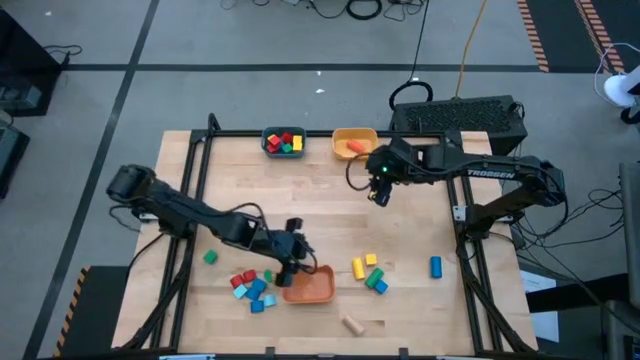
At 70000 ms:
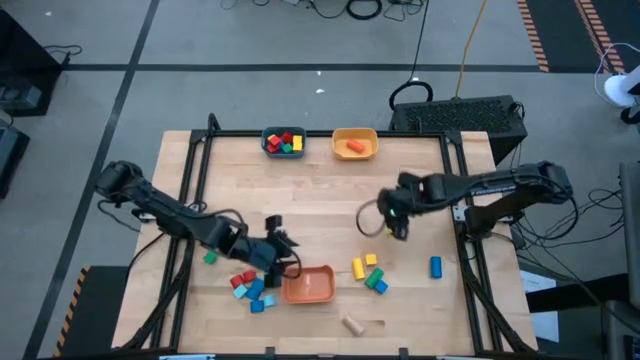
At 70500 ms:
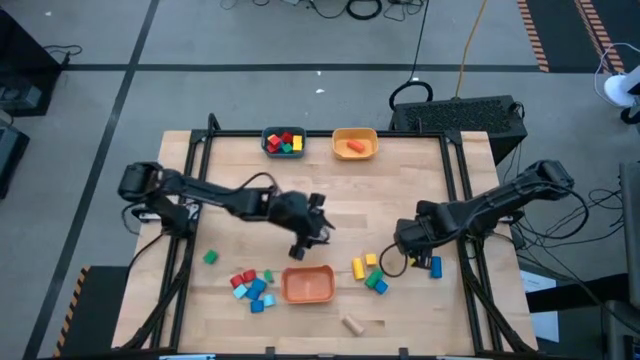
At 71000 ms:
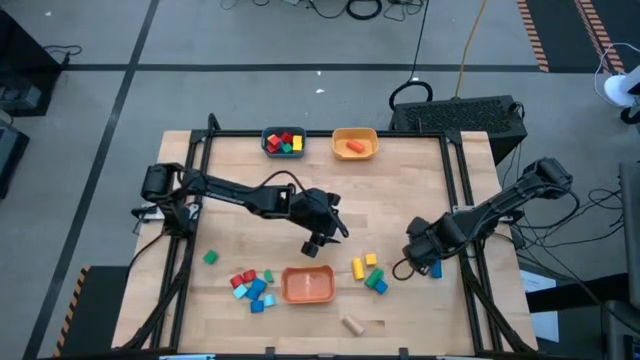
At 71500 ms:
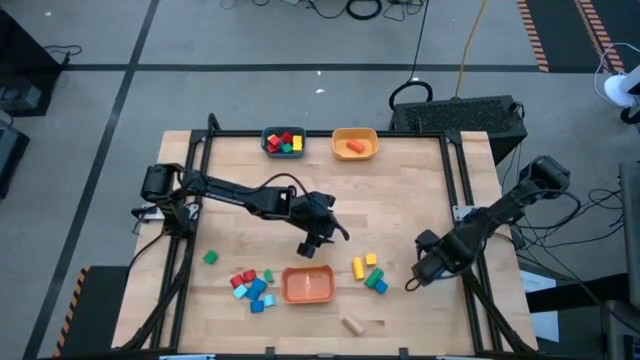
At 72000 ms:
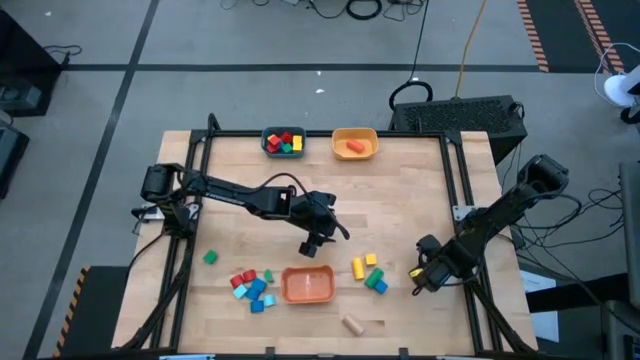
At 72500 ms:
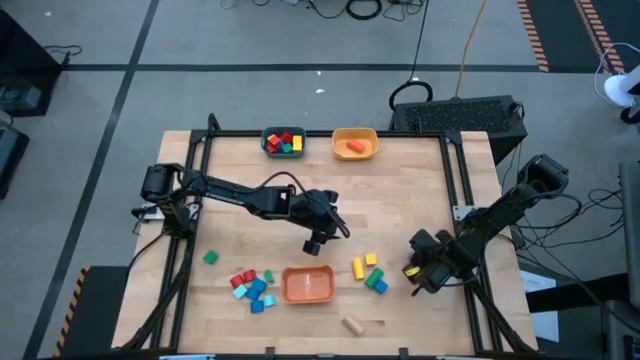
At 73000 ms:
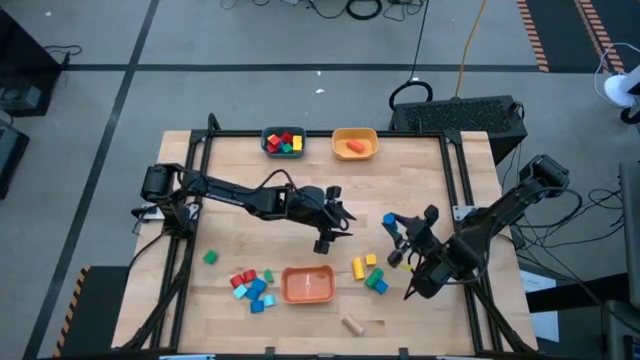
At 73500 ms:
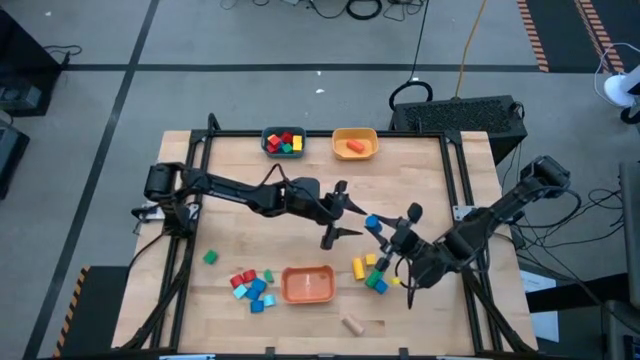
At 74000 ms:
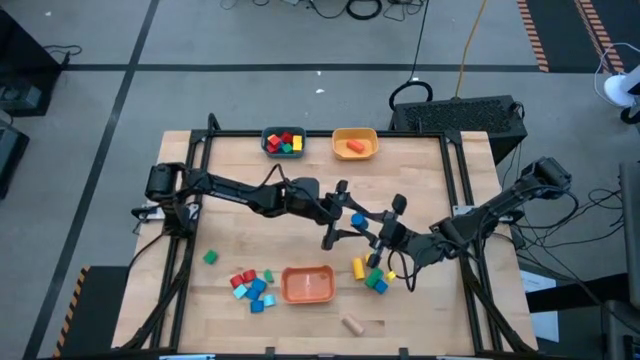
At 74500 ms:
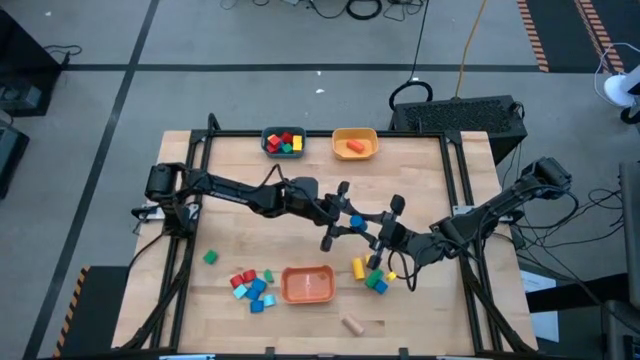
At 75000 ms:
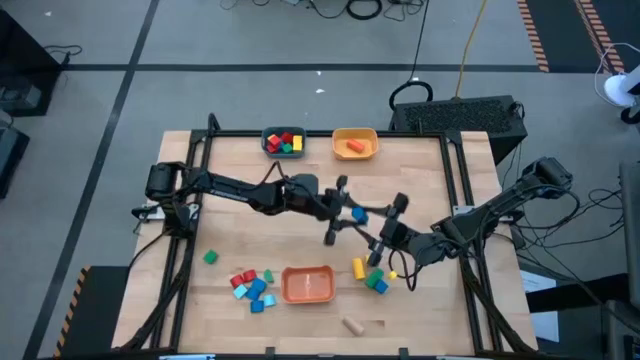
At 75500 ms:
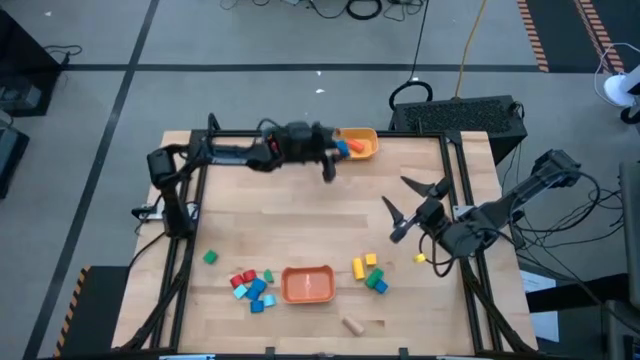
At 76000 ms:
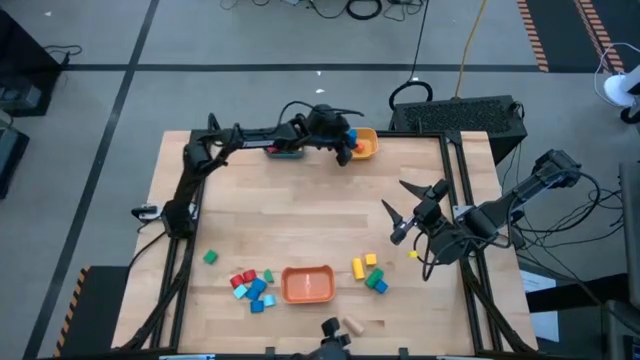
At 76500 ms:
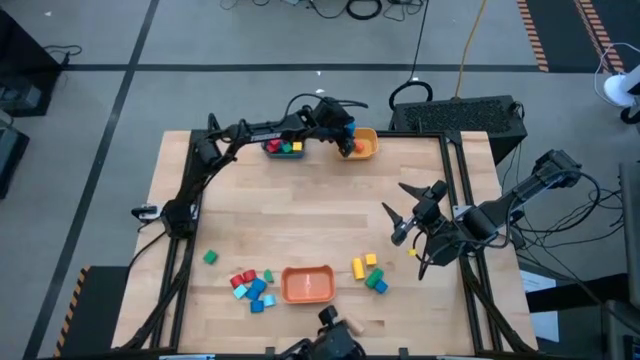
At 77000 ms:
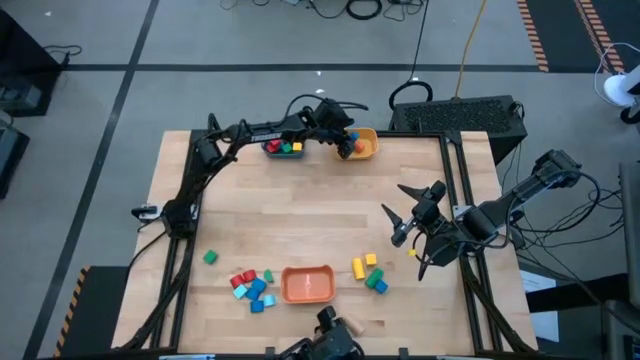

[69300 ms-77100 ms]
Task: Sort blocks by size
Put the blue cylindrical block into the yellow bin

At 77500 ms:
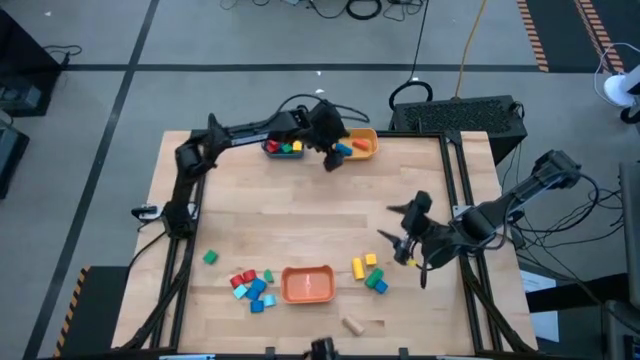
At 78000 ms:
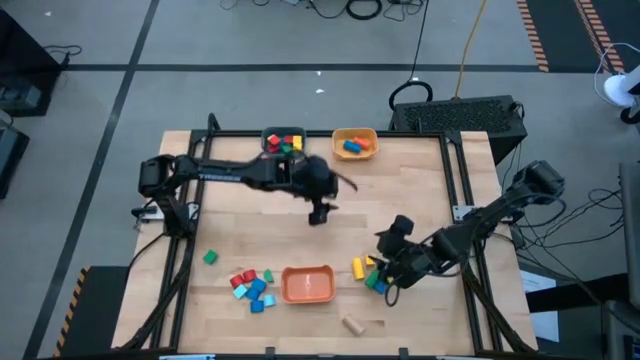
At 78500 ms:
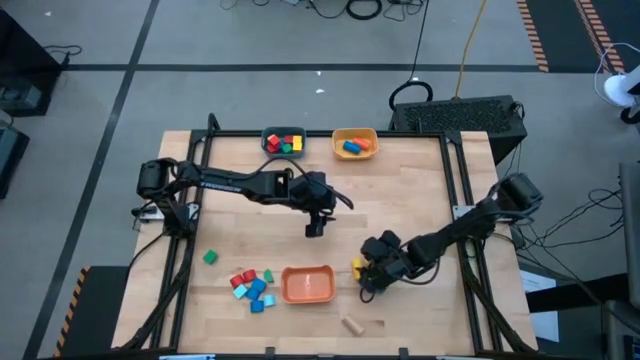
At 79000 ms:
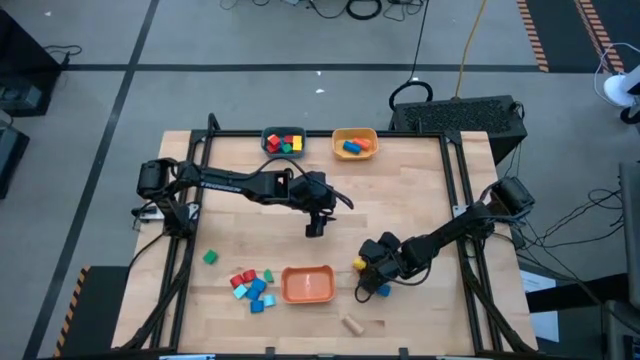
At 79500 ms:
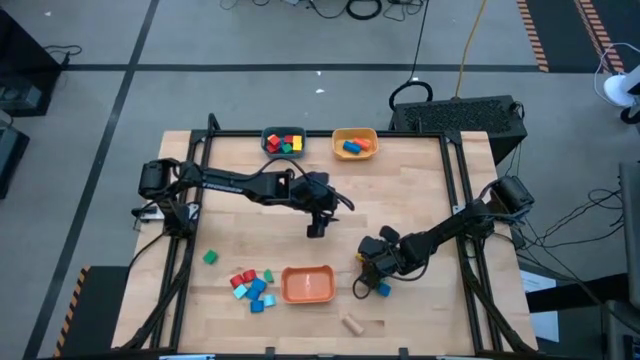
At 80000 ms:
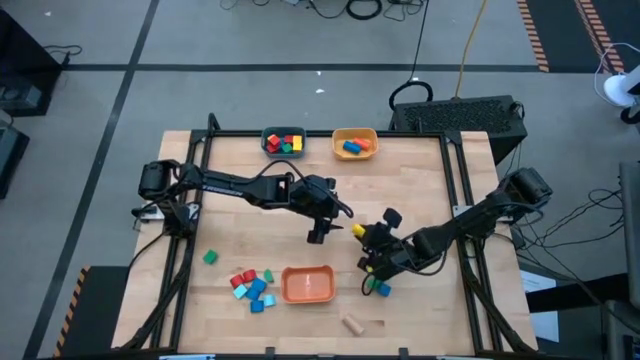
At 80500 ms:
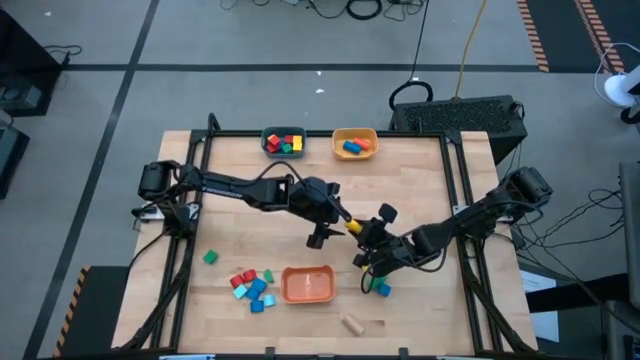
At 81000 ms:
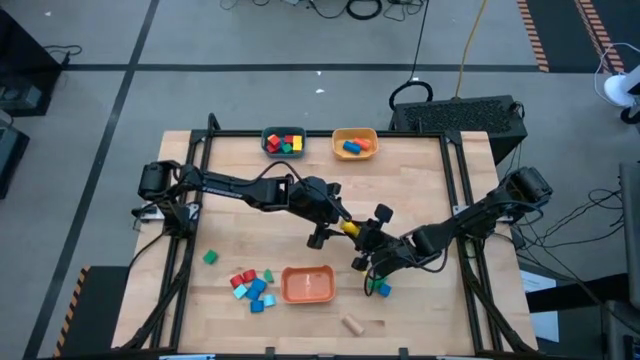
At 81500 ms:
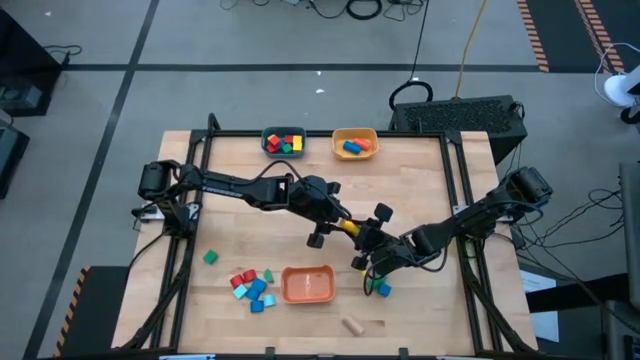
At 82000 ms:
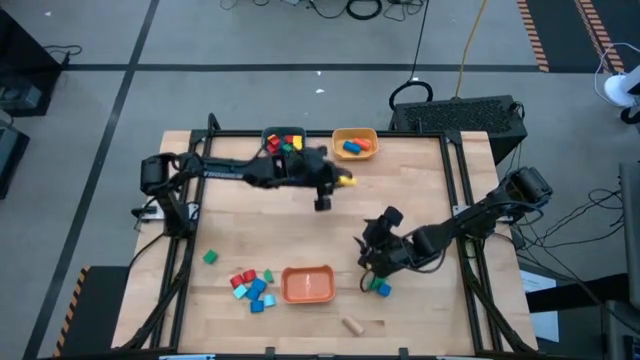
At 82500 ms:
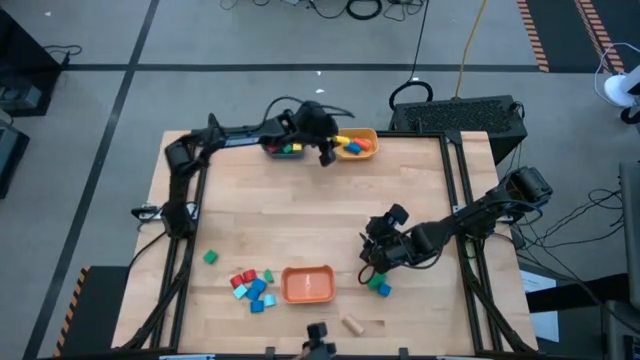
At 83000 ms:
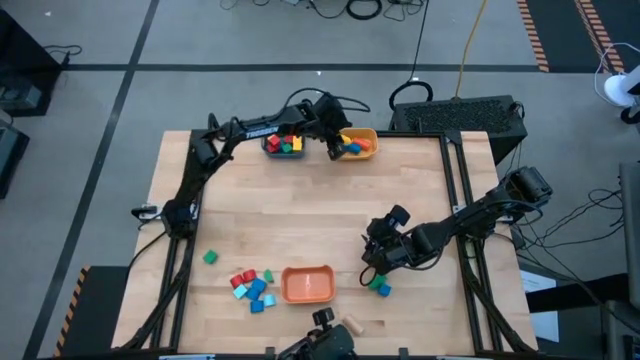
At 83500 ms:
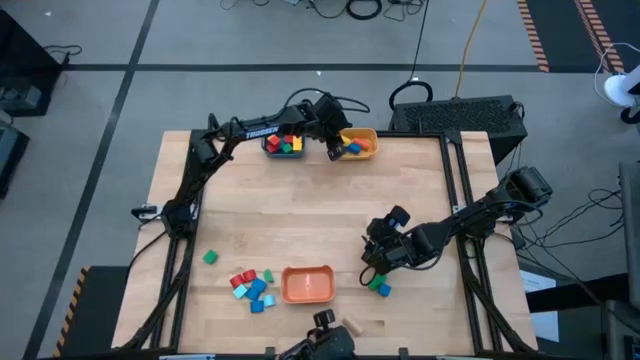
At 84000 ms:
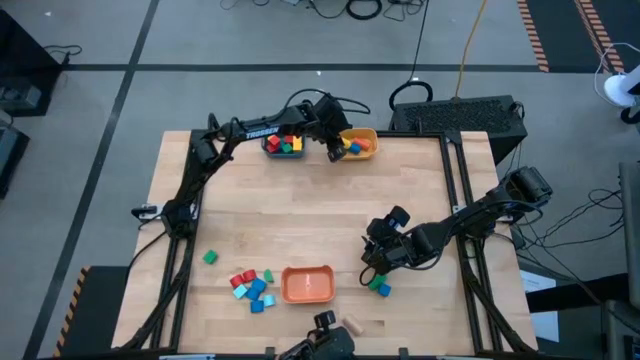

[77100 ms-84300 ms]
Put the yellow cylindrical block into the yellow bin

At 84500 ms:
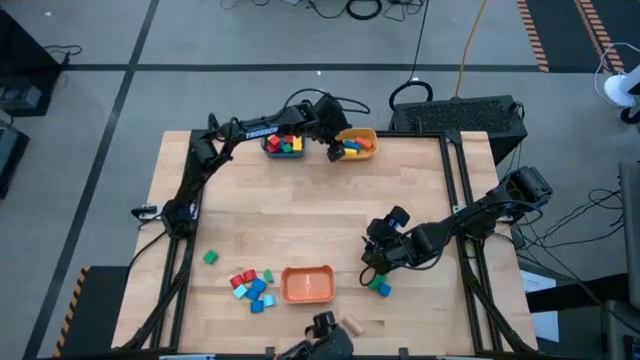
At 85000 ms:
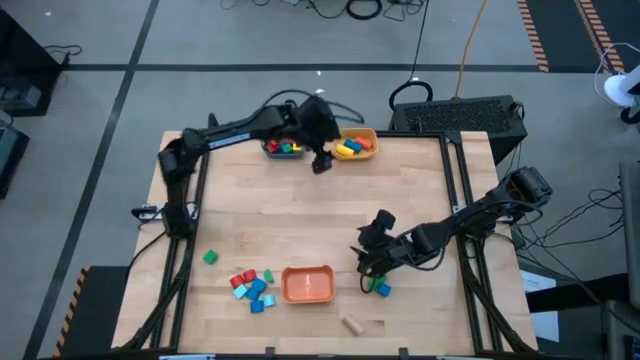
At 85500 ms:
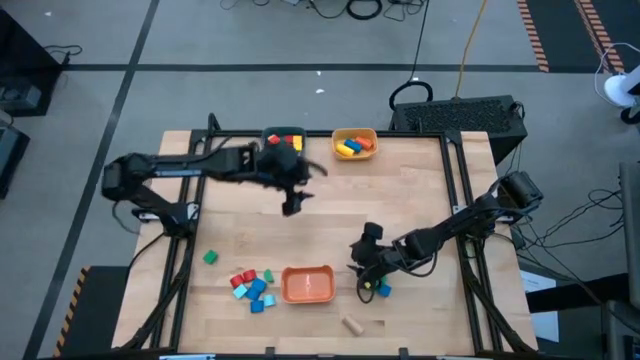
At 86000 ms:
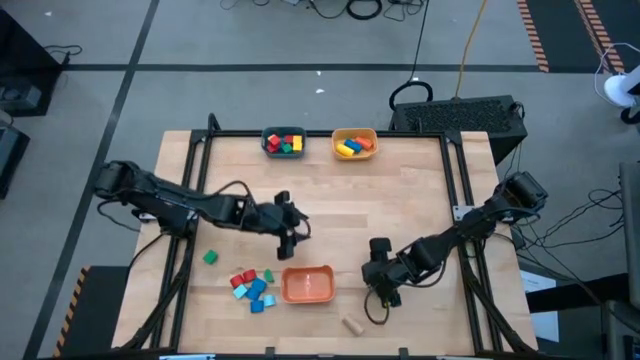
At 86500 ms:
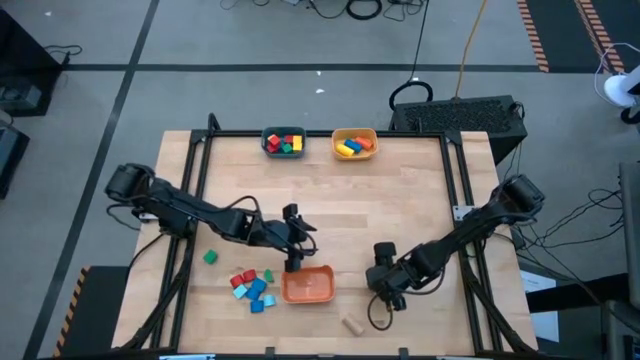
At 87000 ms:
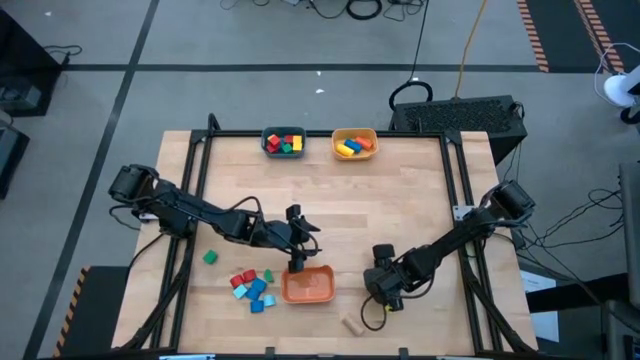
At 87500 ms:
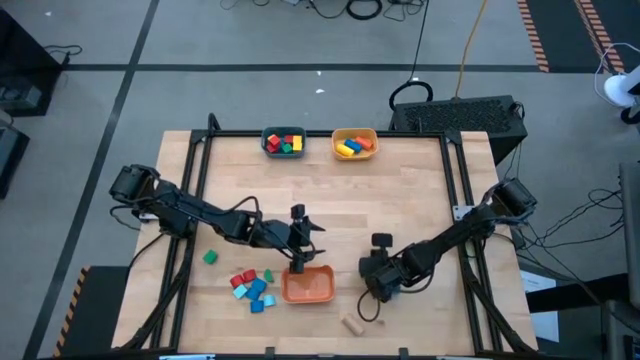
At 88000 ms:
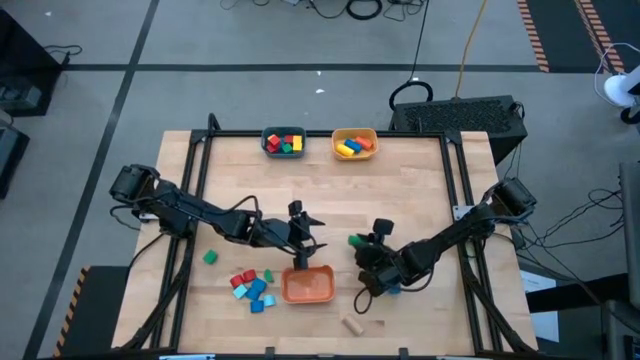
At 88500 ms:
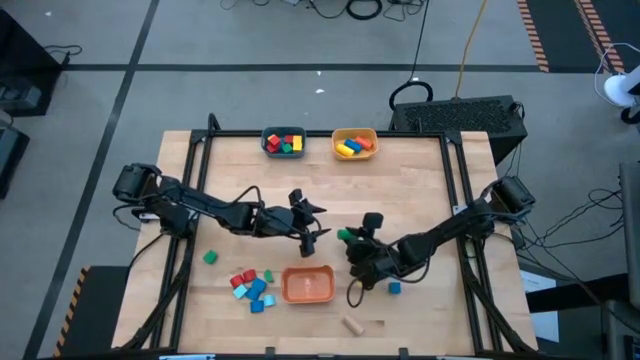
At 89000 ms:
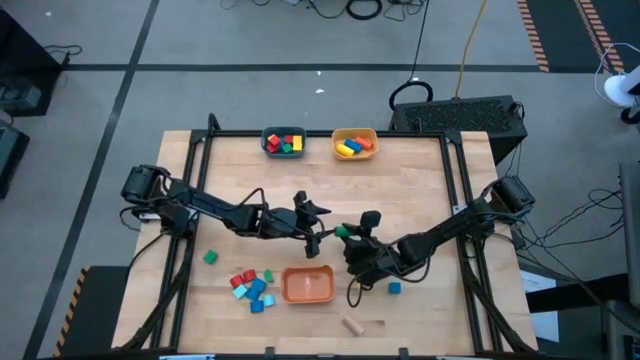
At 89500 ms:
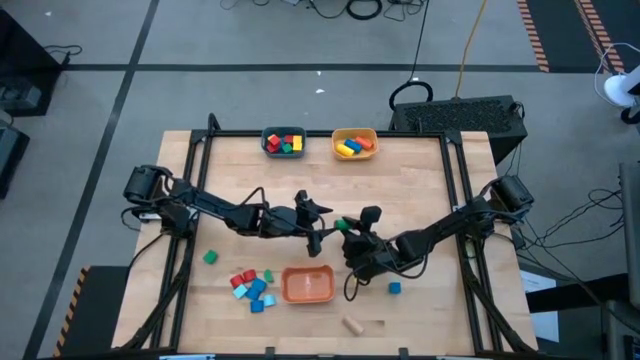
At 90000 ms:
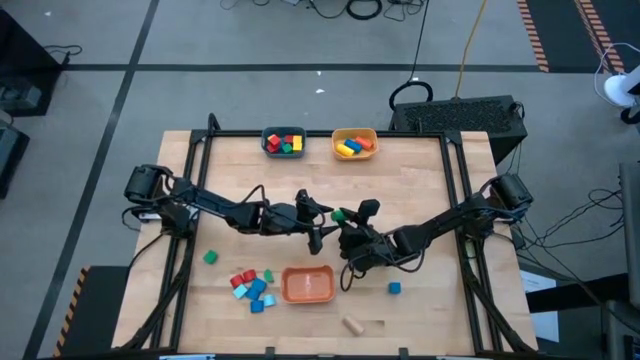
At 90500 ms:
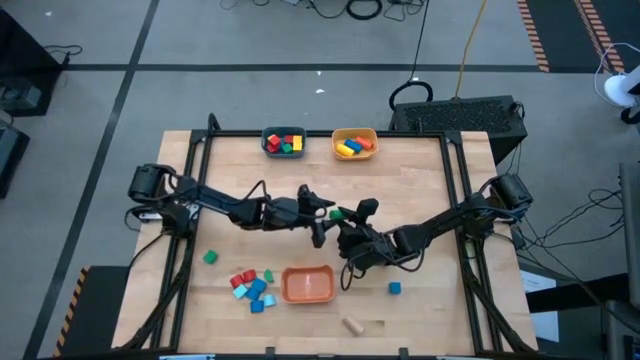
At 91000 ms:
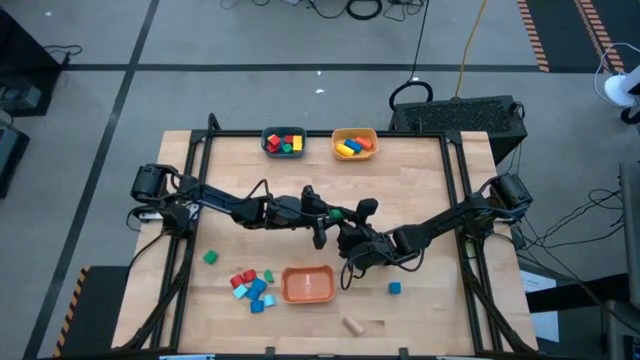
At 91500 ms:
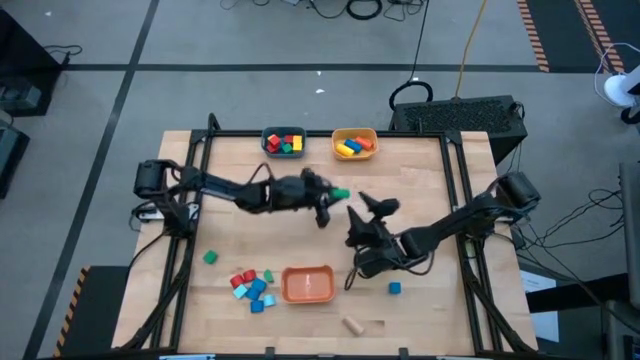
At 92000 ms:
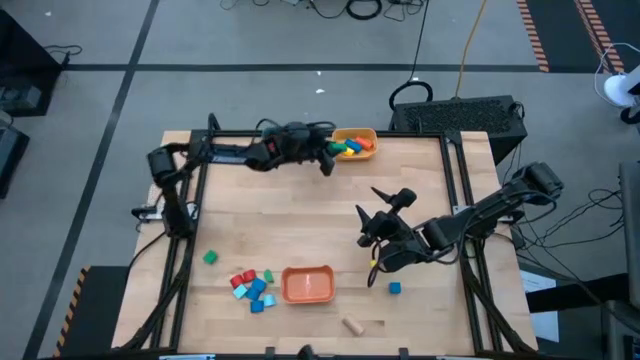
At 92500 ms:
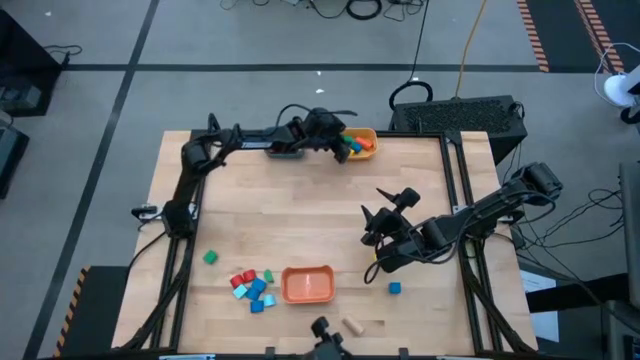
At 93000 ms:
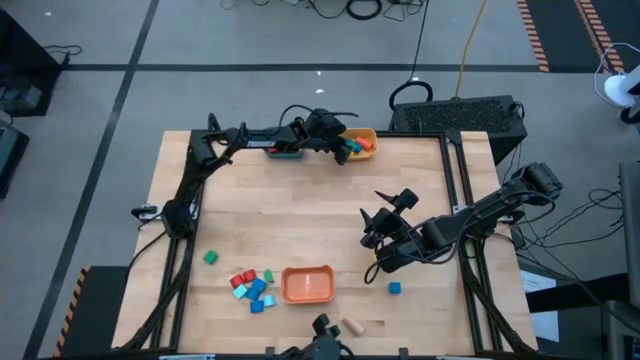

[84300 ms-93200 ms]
Put the green cylindrical block into the yellow bin
